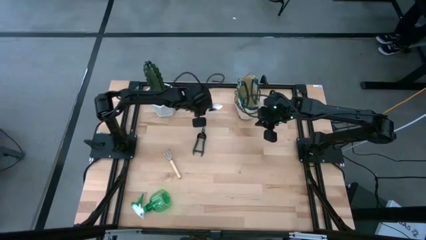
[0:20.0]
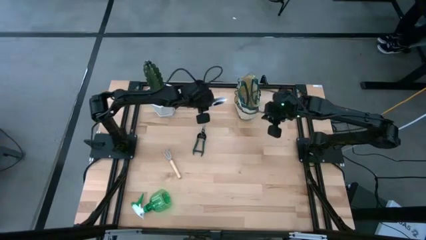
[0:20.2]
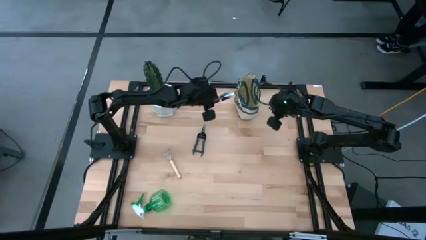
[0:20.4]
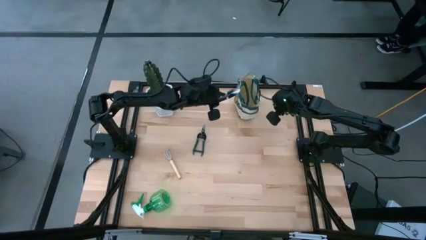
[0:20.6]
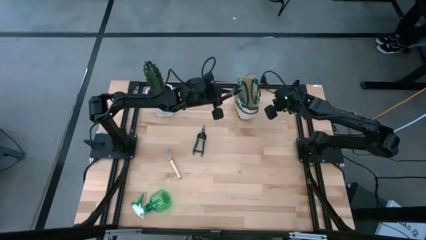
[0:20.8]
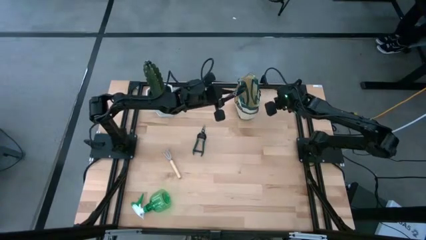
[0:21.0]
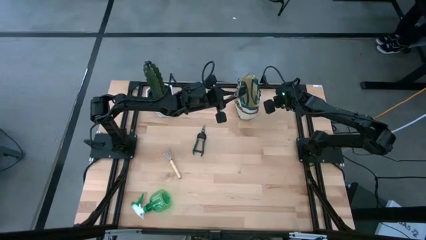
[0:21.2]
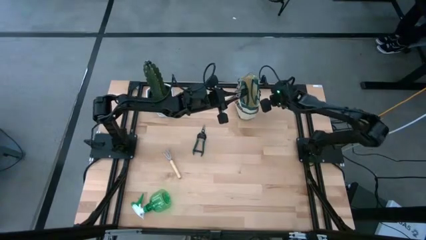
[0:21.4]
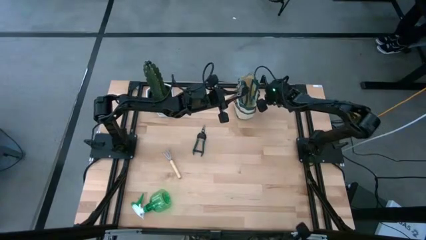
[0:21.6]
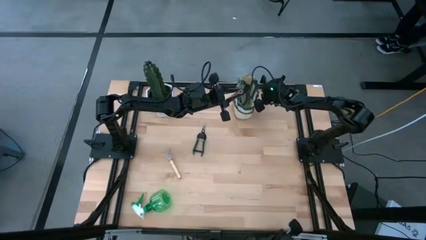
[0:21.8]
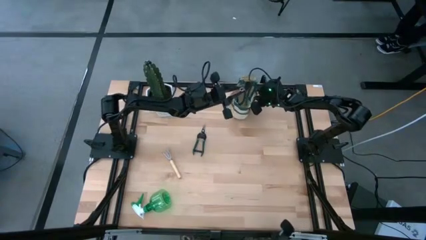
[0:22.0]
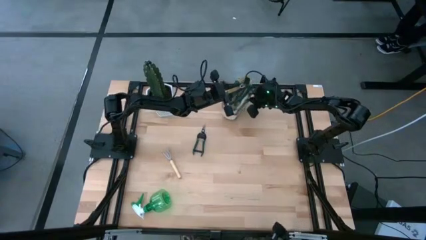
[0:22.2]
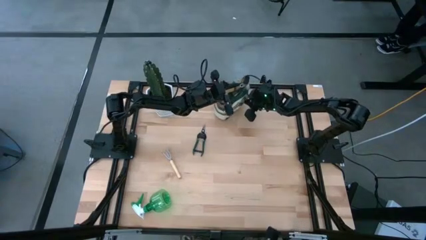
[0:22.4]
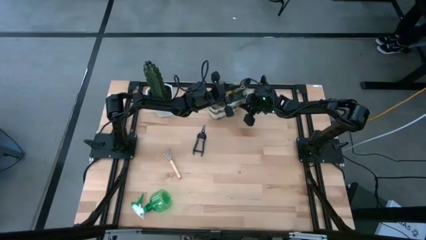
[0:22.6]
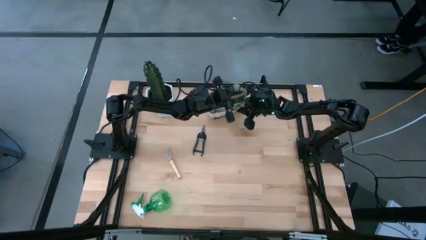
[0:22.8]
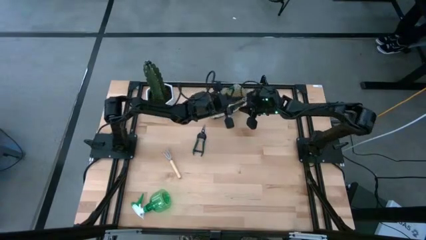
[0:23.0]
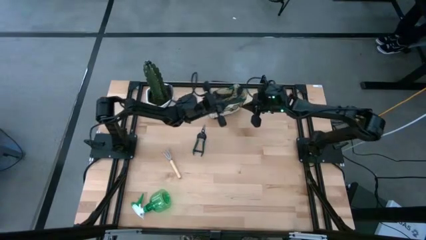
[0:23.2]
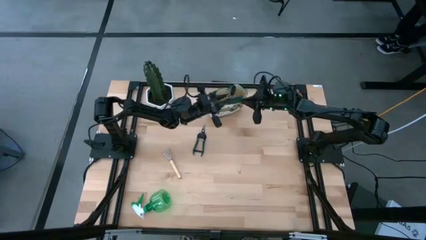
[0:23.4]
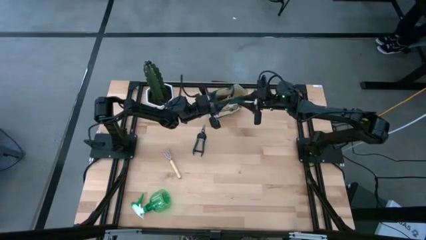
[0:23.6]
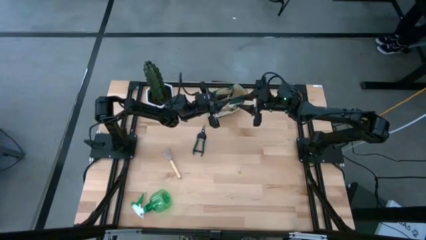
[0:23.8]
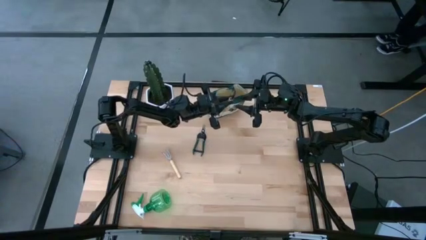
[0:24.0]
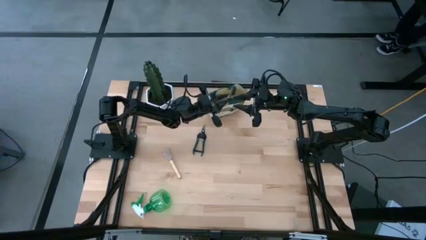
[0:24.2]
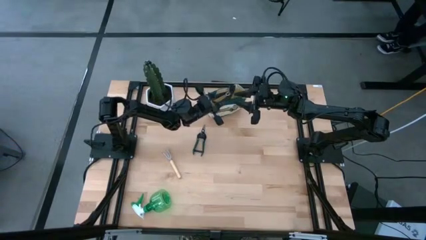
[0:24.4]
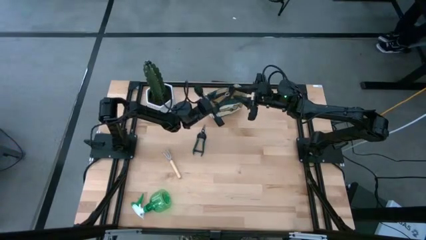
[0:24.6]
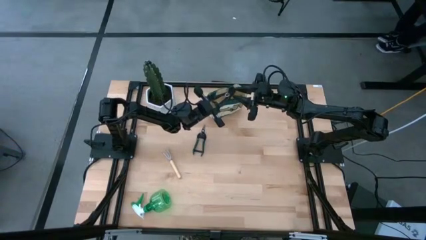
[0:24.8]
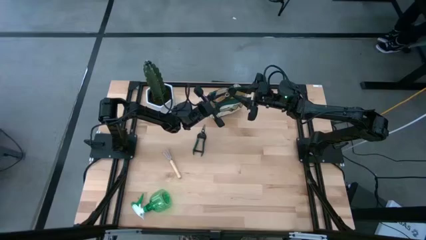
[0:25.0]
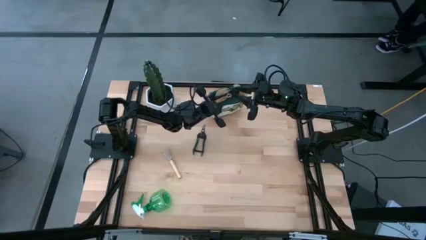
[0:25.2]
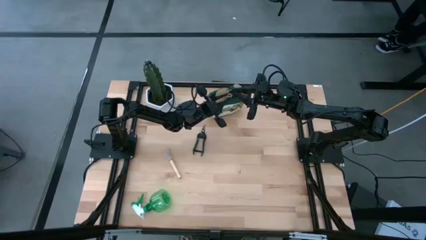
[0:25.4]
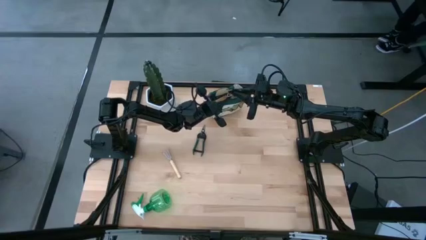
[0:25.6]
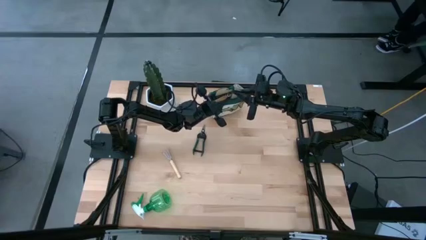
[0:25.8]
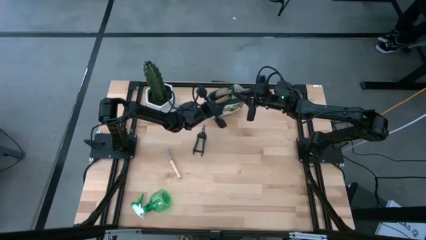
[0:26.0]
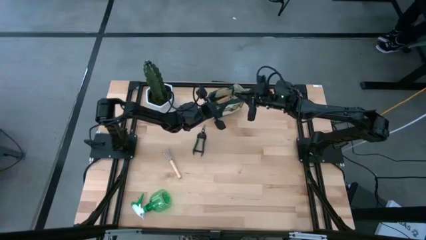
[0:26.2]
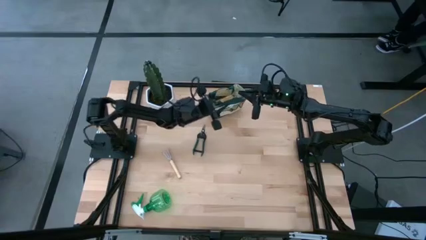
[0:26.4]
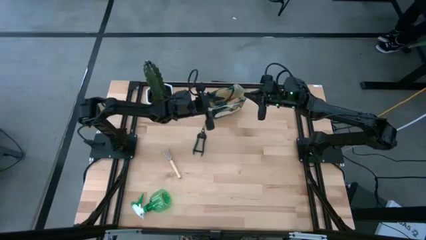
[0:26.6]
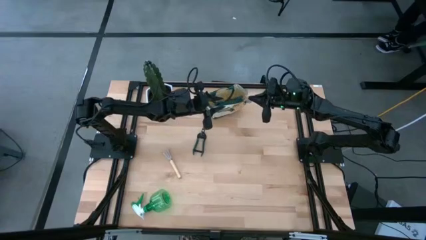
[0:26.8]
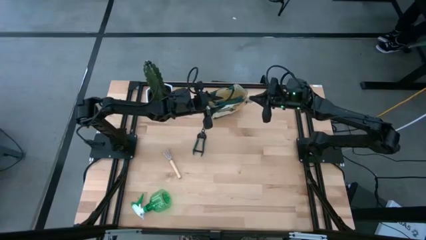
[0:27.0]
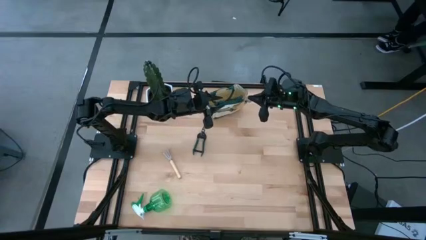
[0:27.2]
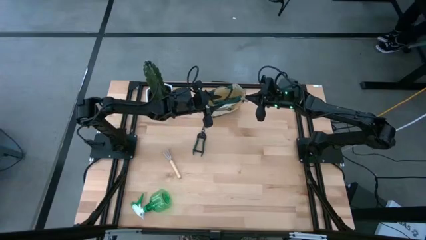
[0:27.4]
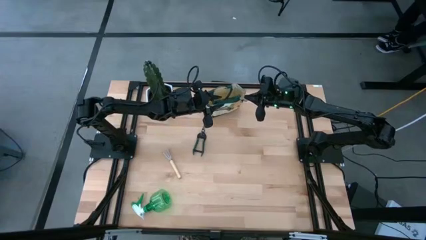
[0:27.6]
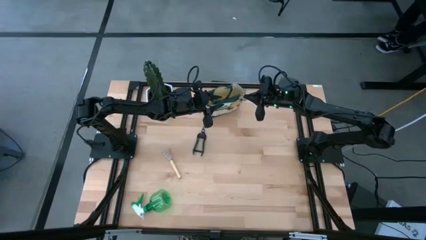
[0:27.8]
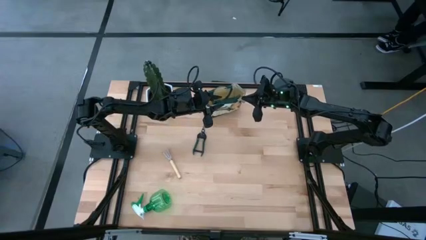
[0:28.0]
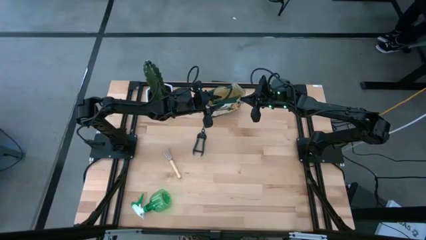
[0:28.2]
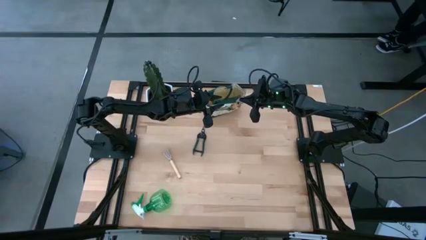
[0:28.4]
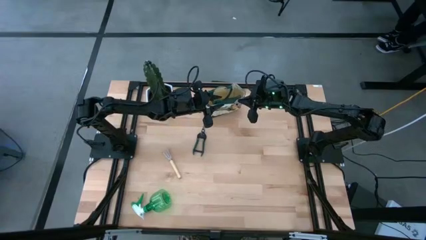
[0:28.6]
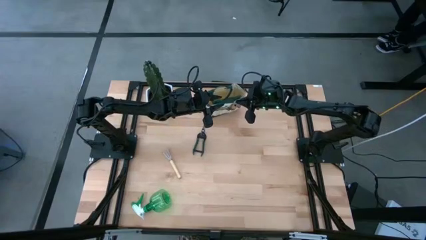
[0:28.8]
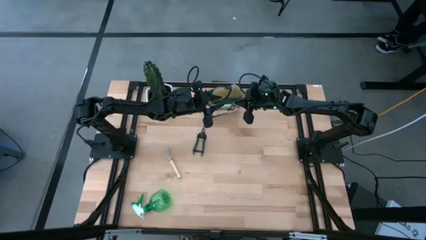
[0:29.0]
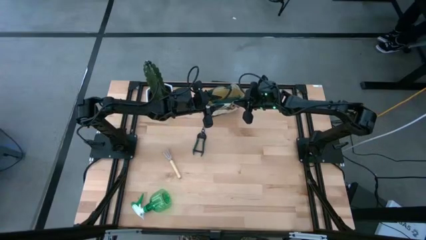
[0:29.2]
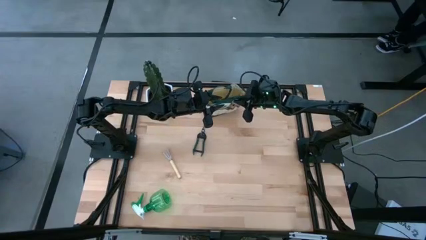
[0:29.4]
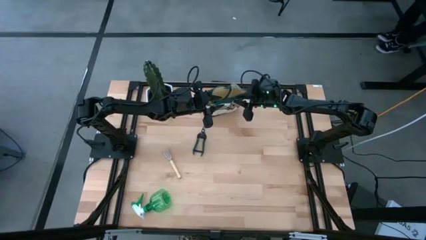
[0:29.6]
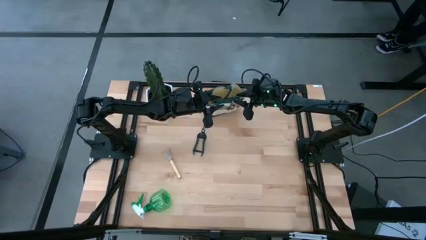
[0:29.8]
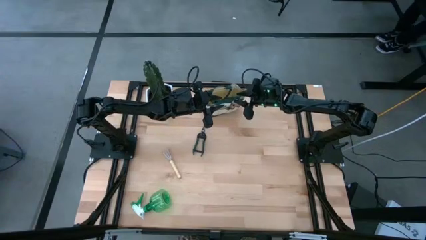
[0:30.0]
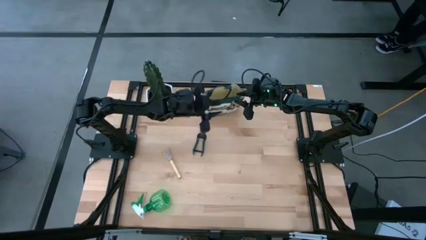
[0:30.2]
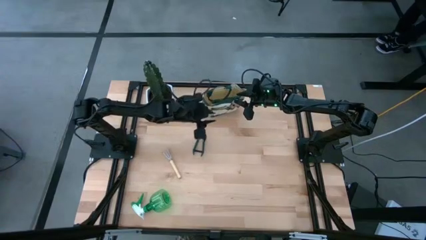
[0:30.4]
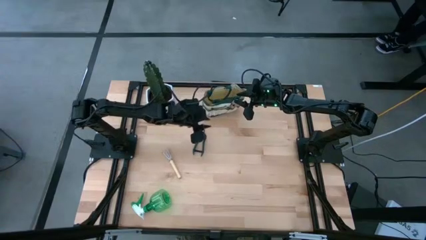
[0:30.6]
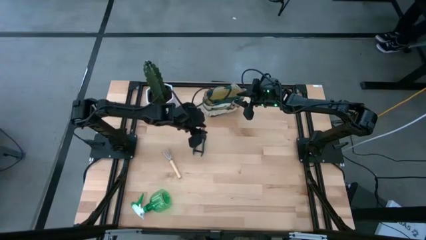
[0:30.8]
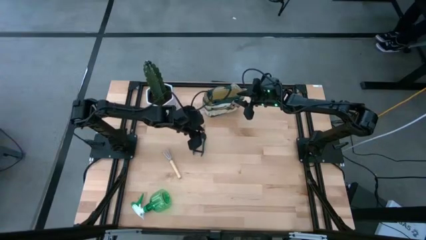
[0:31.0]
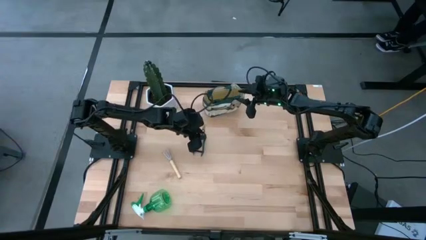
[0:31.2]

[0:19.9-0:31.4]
Task: Pick & Place Garden tools in Gardening bag
Put the trowel into the gardening bag

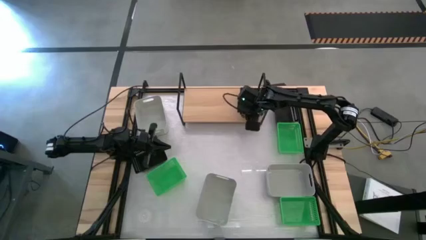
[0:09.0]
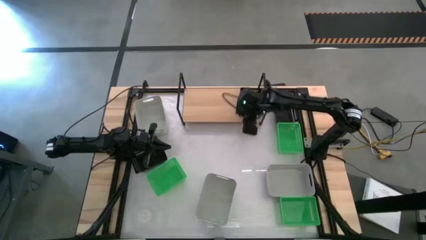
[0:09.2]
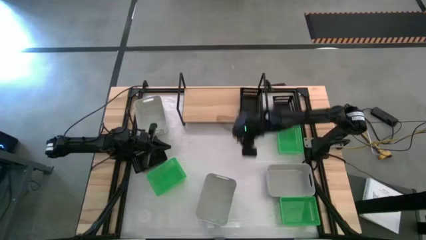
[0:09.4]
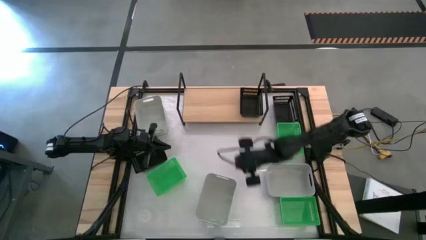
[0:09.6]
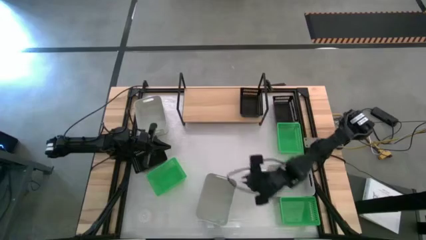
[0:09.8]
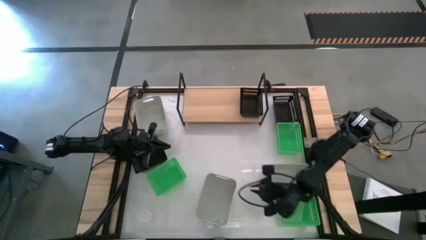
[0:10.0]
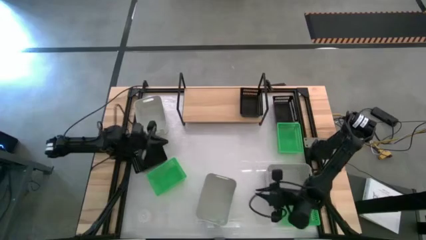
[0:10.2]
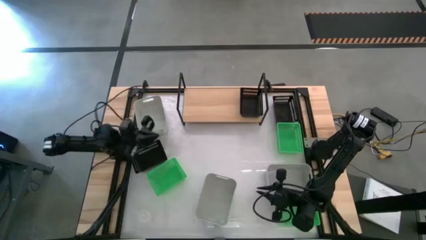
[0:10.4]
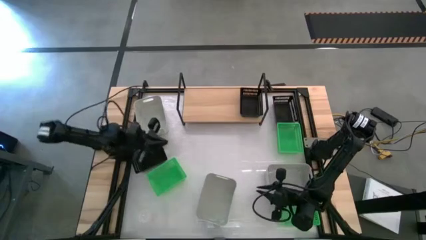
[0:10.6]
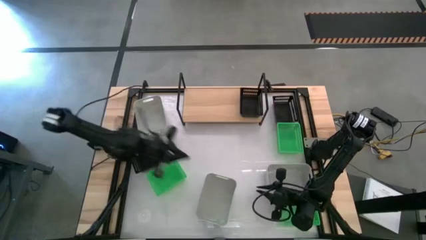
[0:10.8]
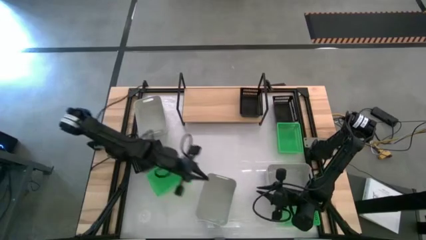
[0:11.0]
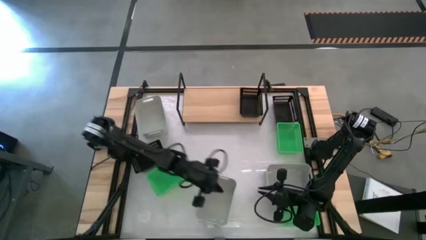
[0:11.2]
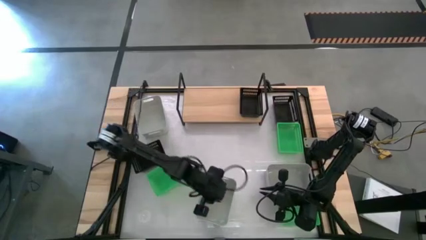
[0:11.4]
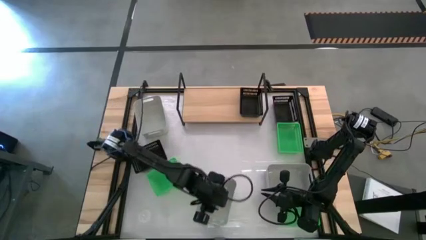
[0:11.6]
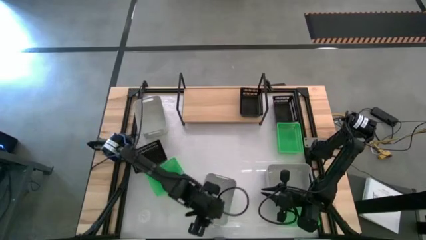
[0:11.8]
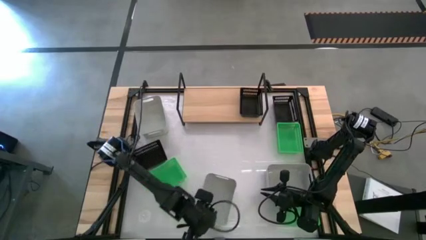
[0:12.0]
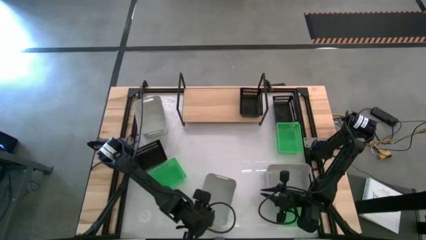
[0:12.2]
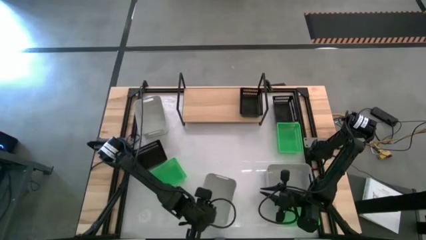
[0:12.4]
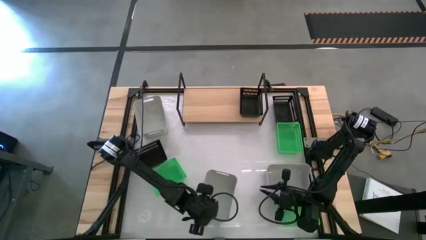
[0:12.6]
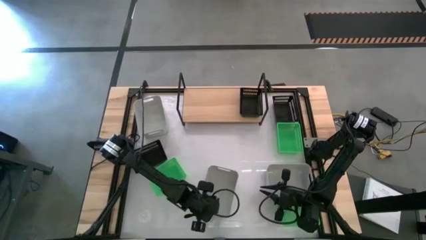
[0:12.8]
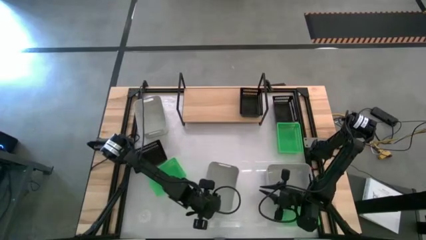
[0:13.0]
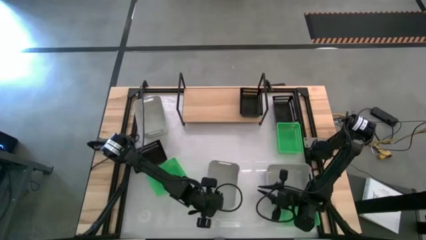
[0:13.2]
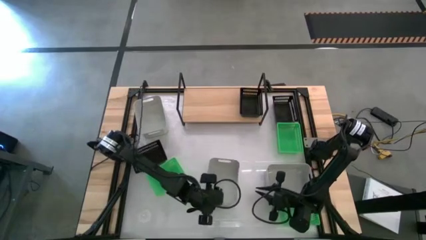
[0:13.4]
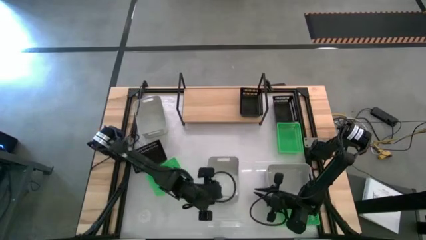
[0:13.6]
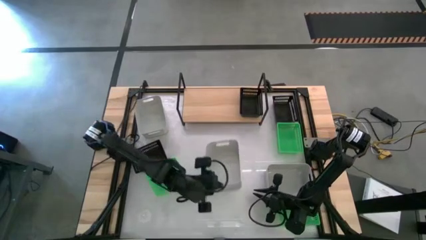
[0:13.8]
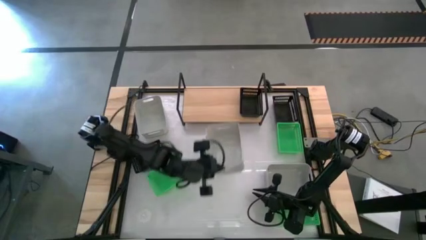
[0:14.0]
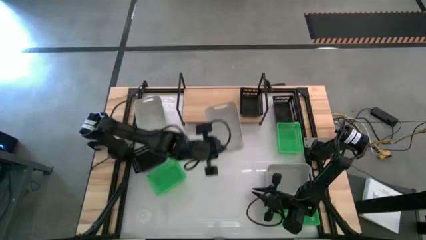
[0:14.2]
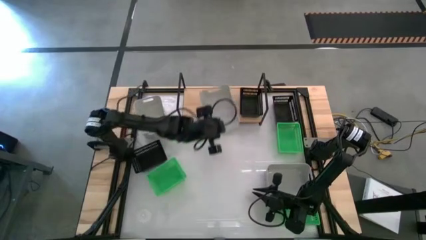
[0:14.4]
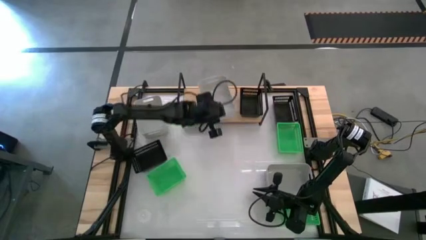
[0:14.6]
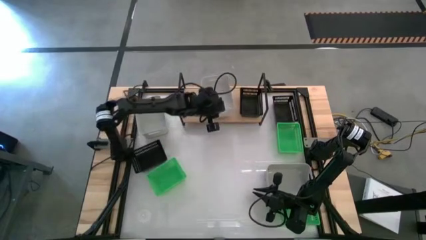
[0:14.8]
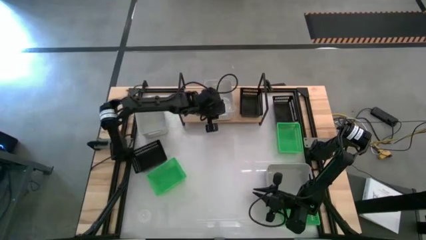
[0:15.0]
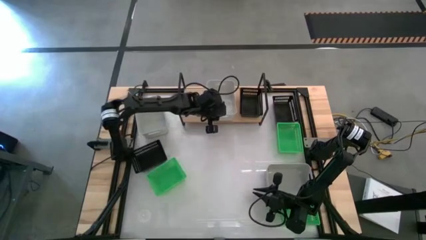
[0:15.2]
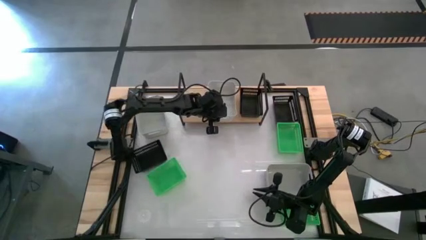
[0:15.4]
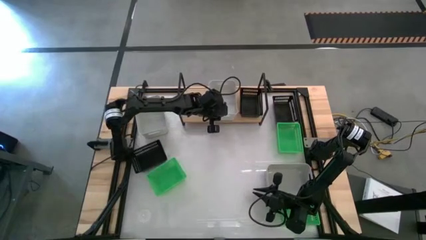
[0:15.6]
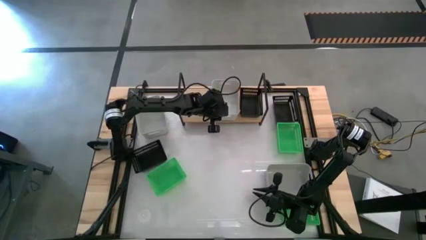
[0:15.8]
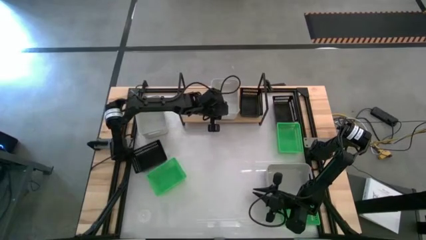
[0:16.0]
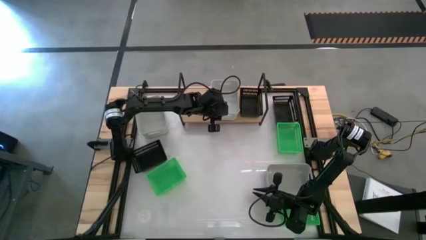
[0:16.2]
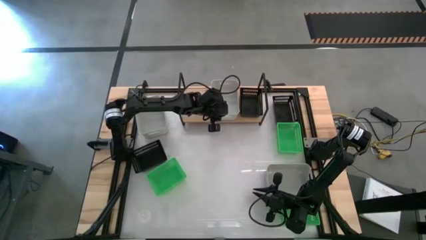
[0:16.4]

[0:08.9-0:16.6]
Task: Stack baskets on shelf by color
Put the bottom white bin on the shelf
